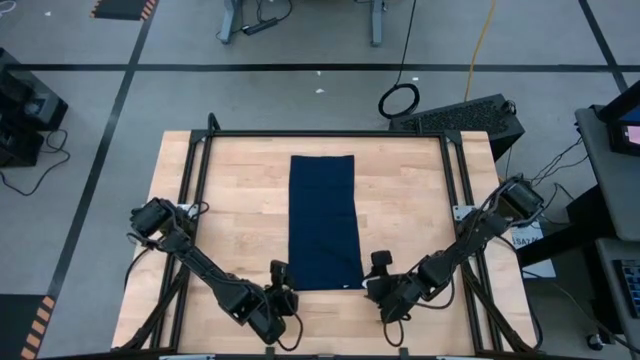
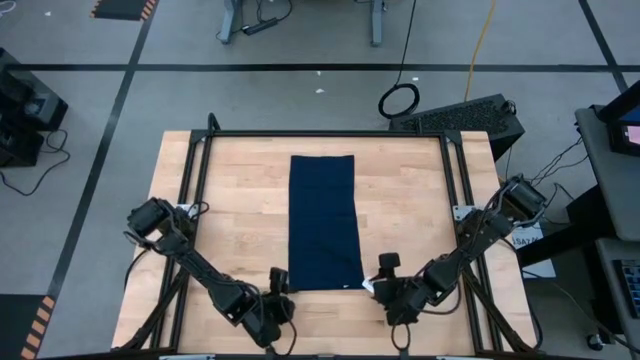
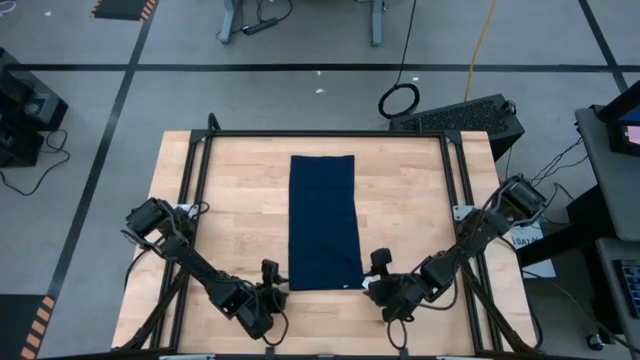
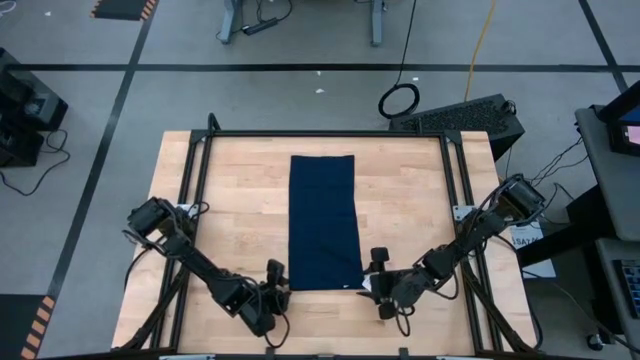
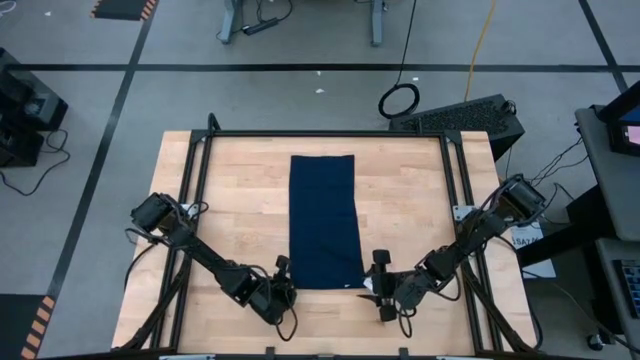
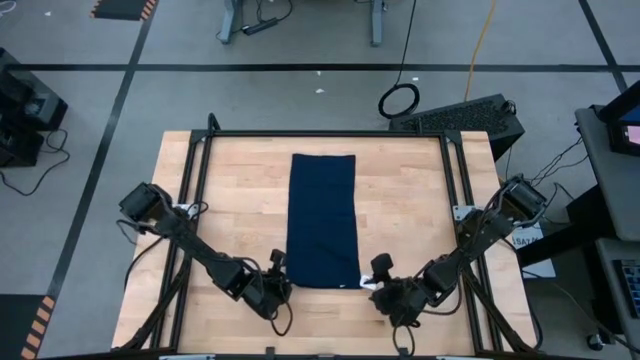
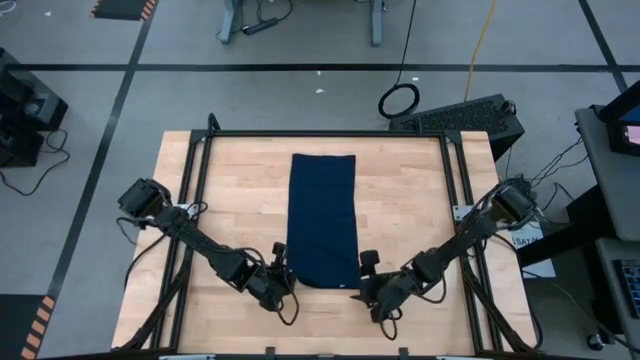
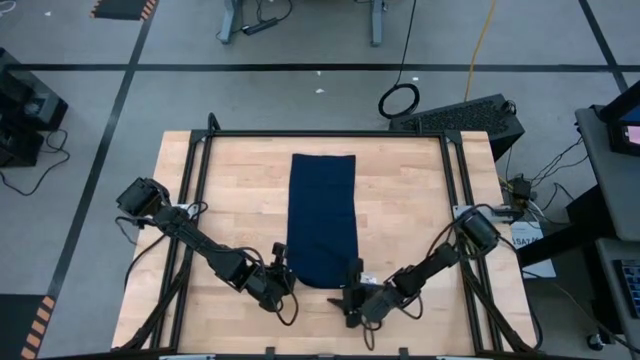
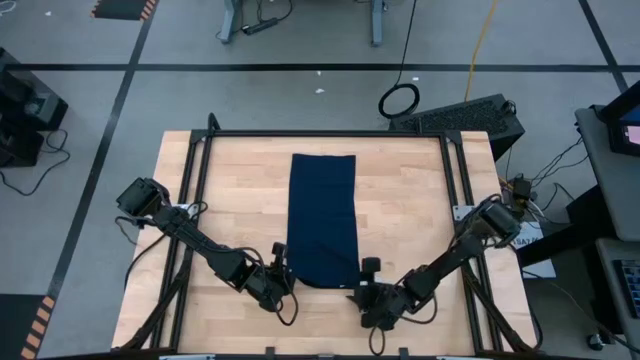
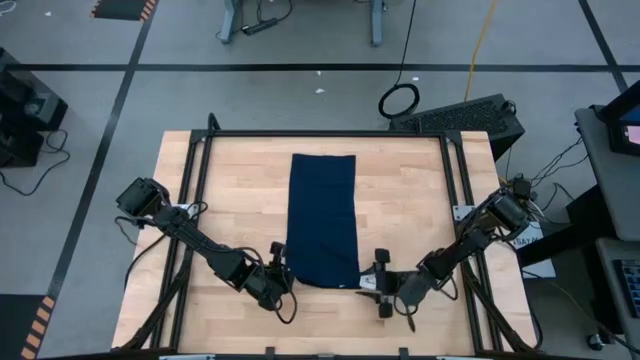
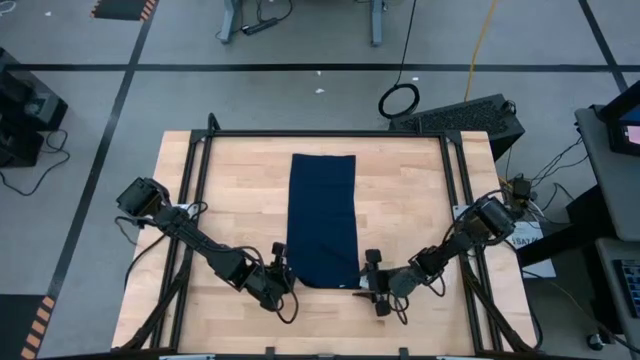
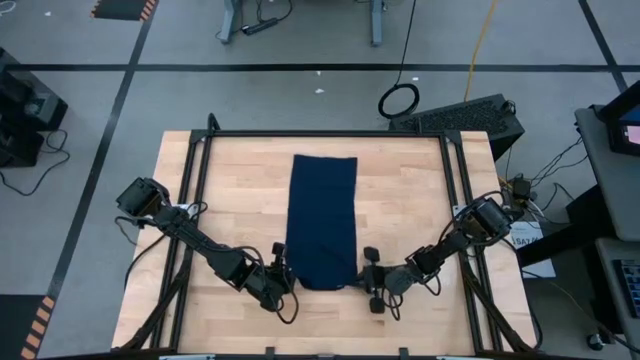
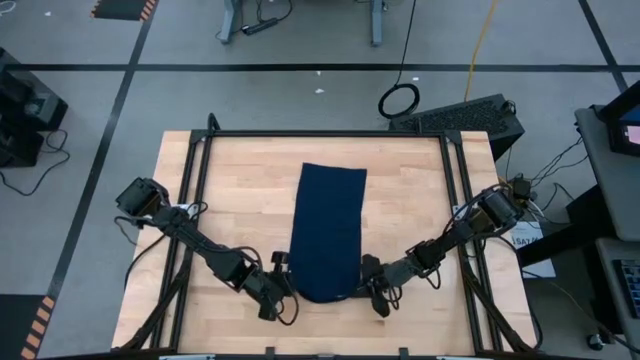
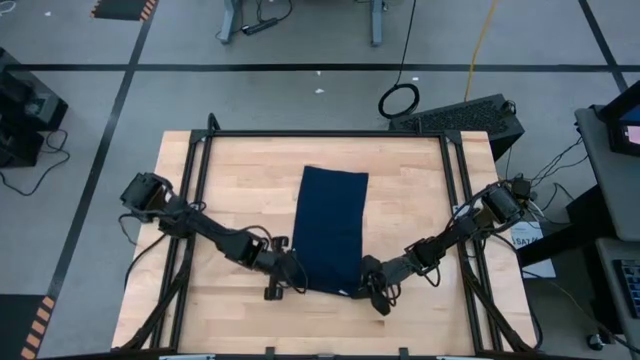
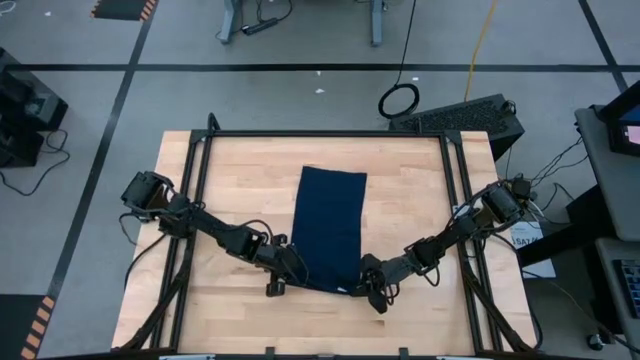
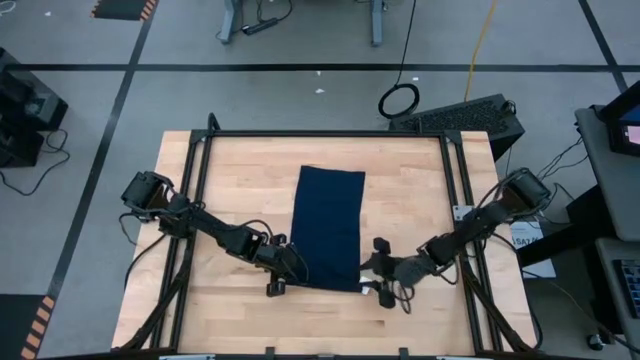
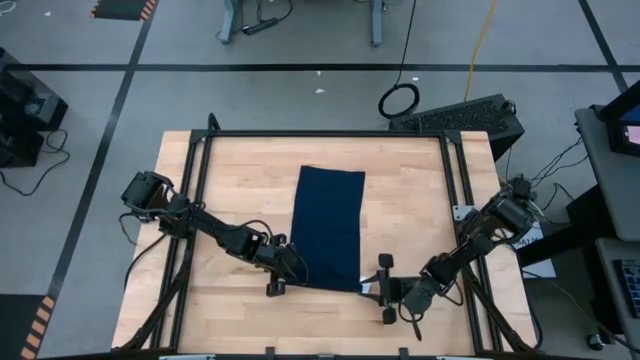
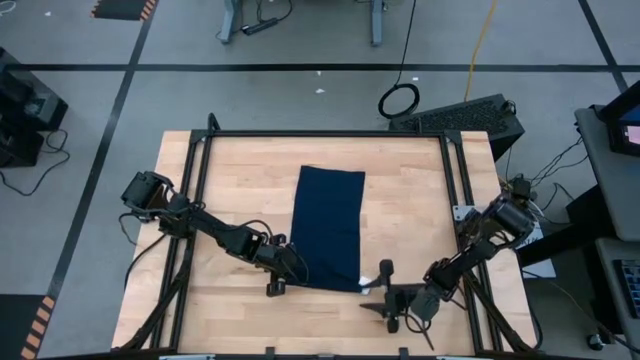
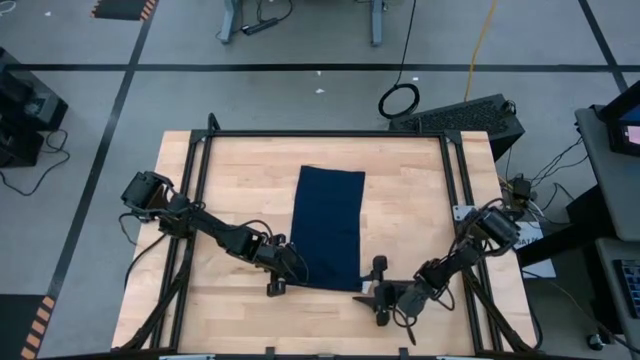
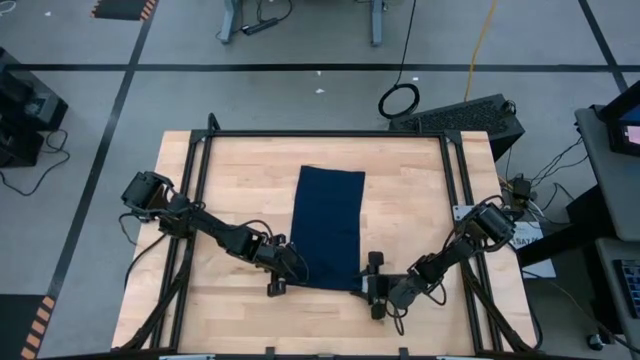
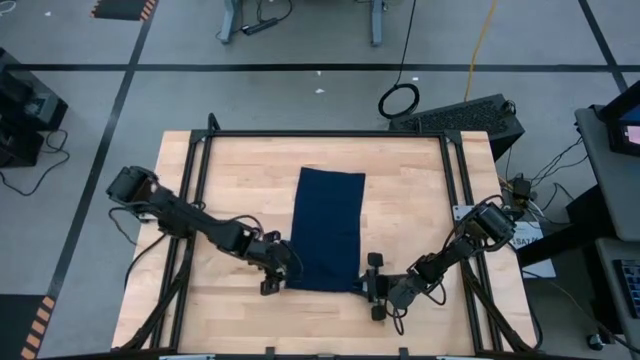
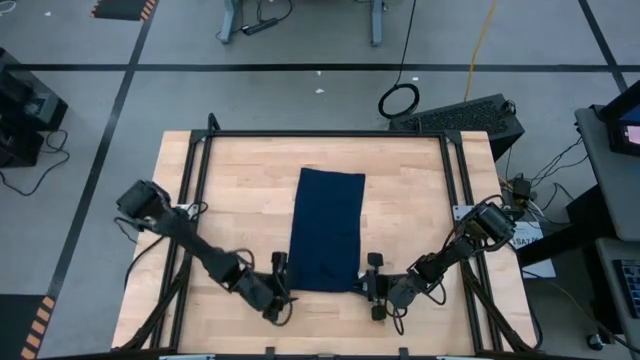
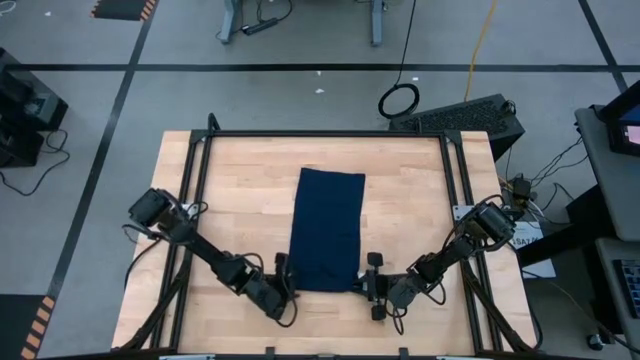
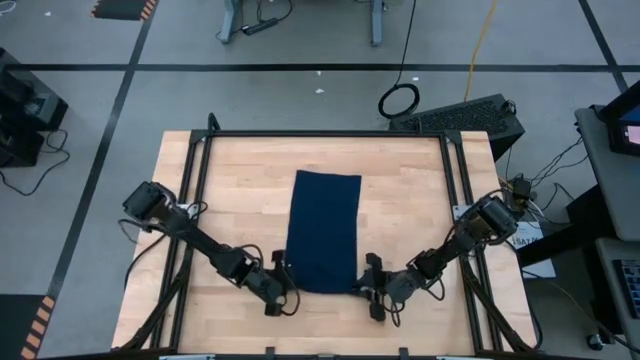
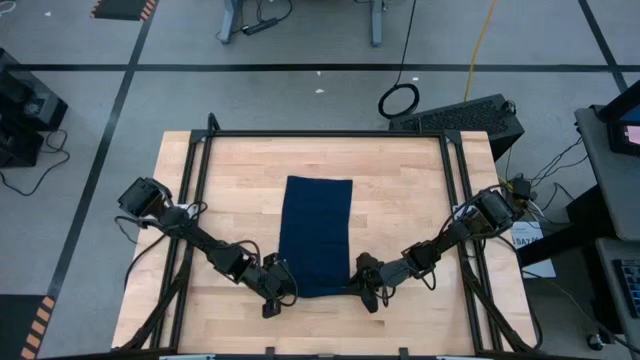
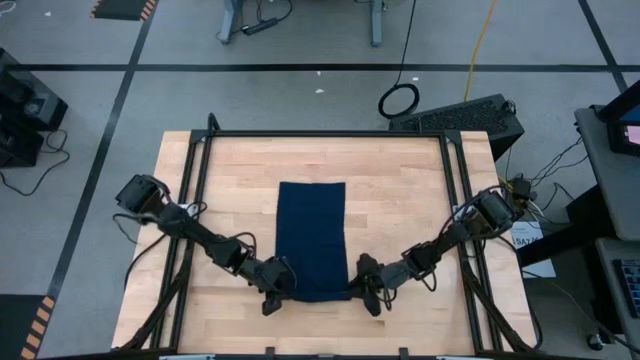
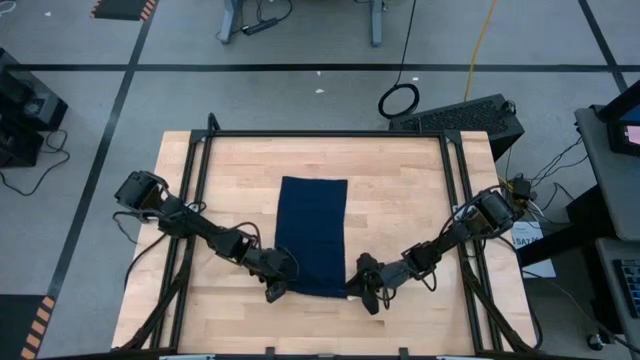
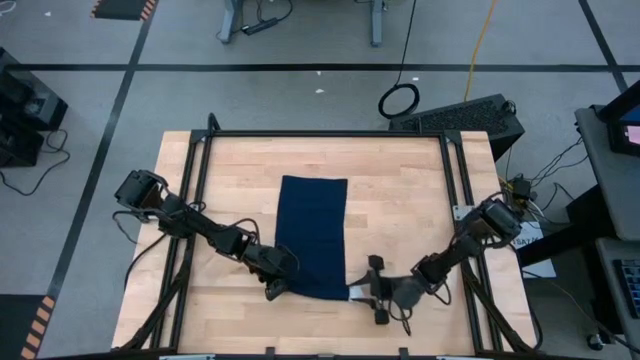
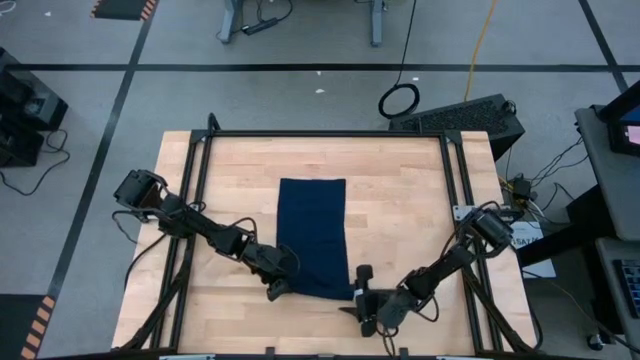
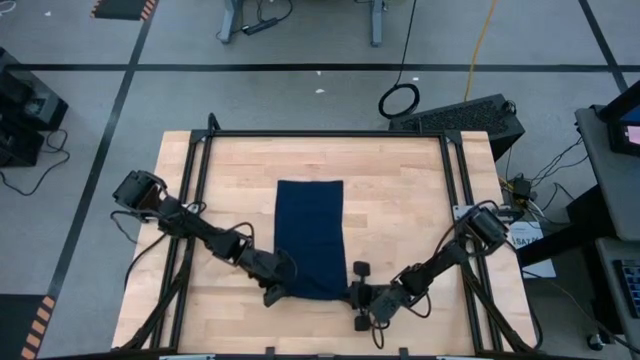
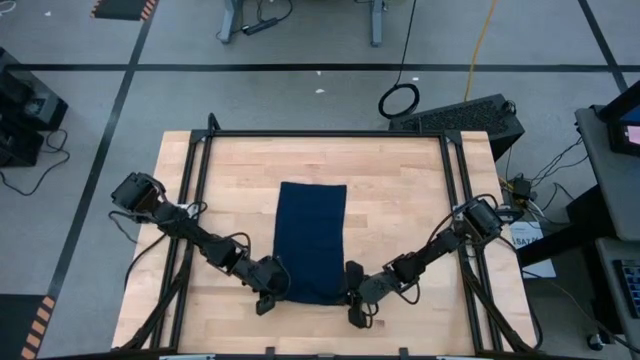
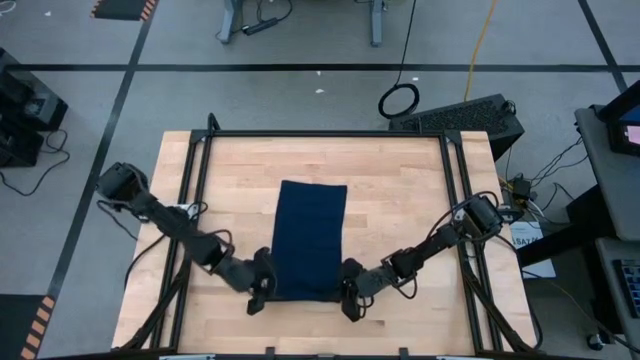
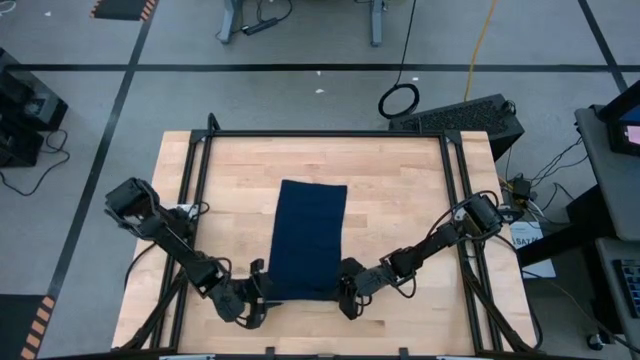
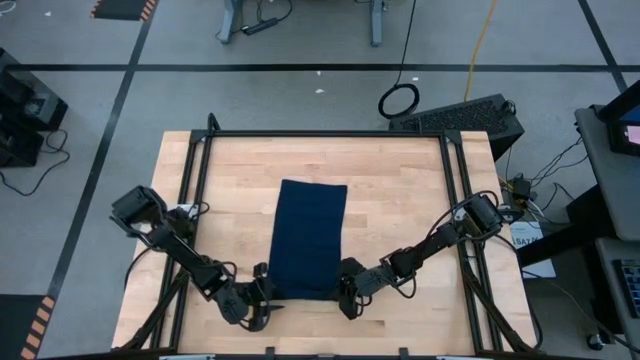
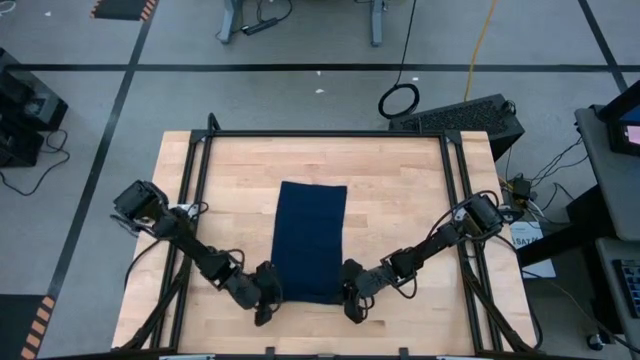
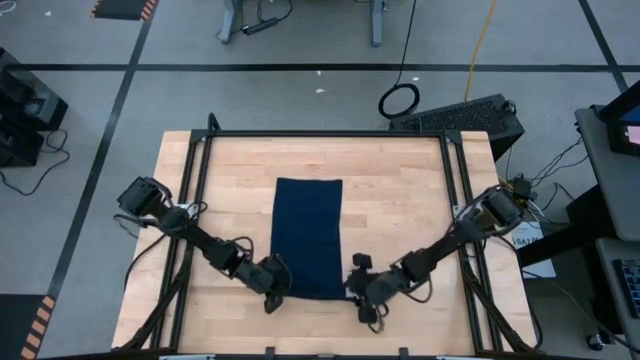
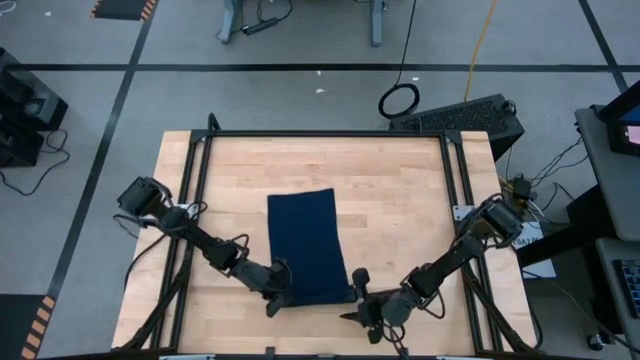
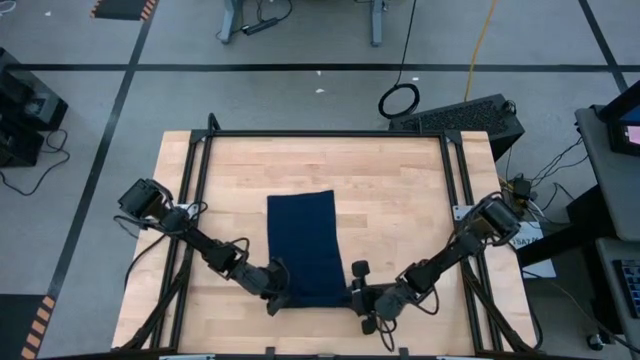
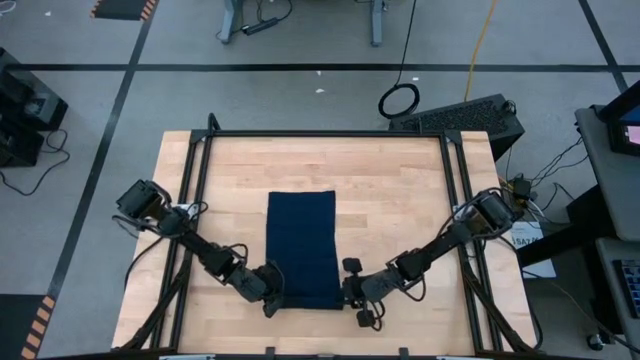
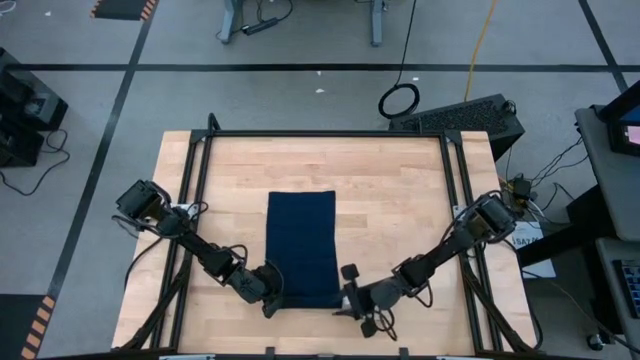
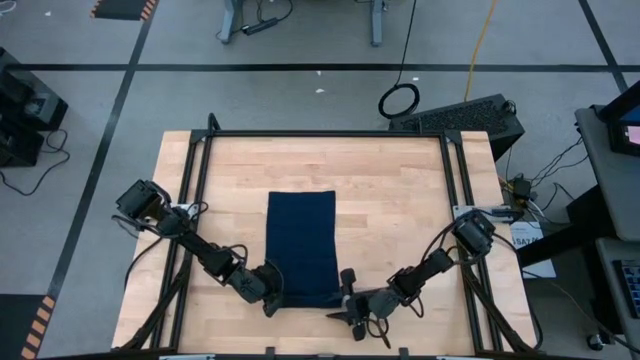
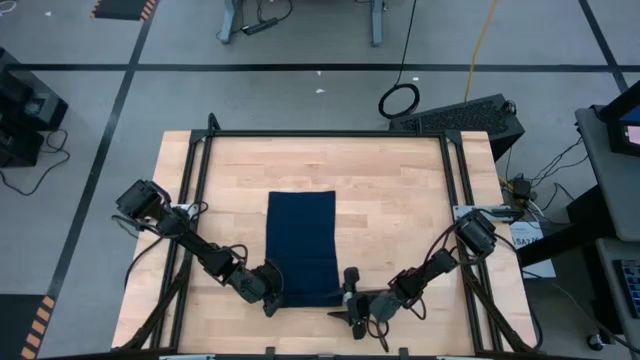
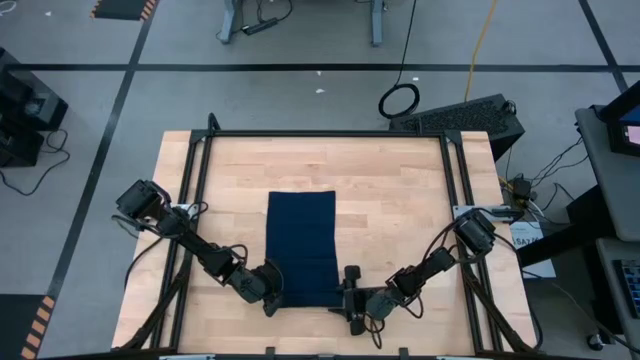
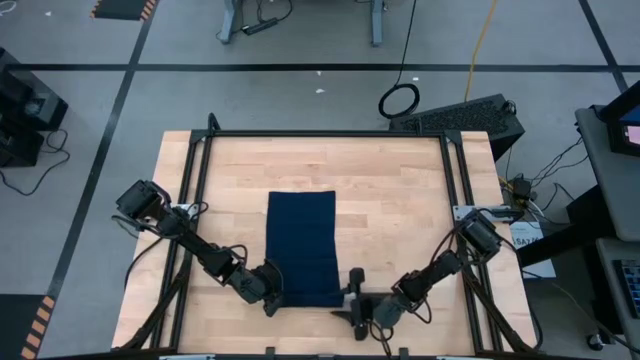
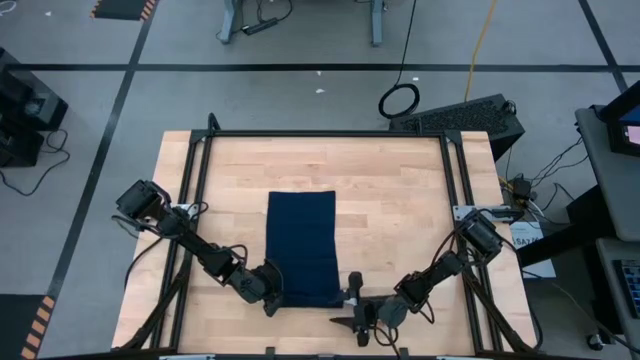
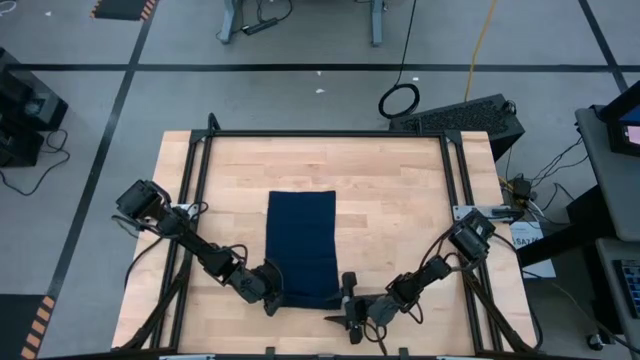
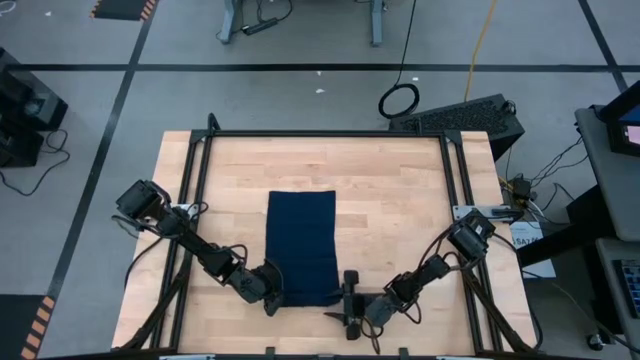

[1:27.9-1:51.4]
Task: Roll towel
Roll the dark blue towel
